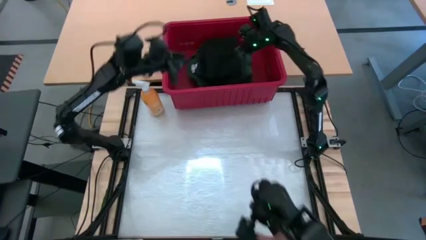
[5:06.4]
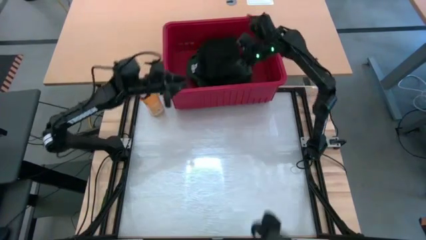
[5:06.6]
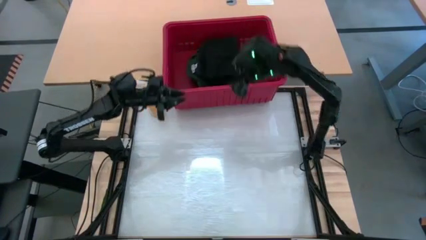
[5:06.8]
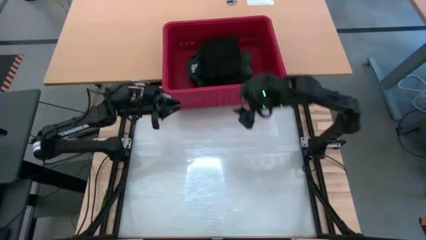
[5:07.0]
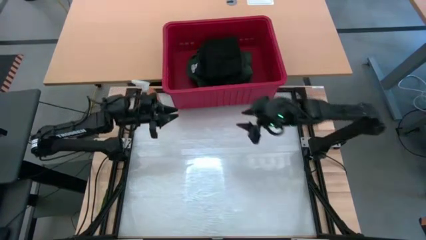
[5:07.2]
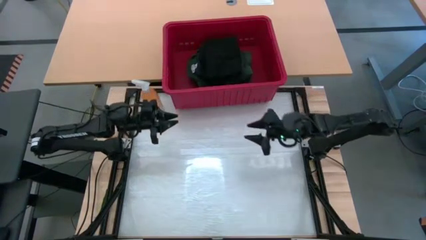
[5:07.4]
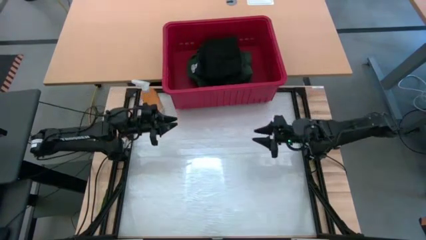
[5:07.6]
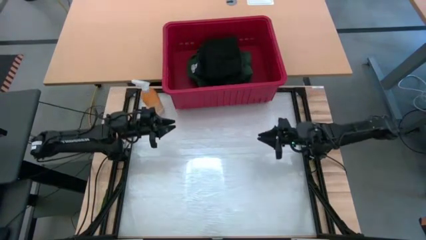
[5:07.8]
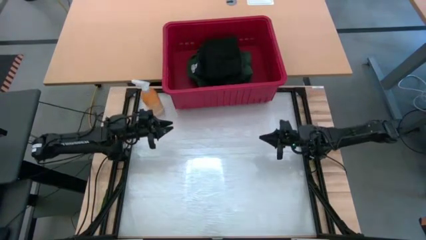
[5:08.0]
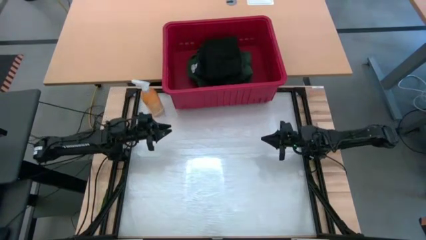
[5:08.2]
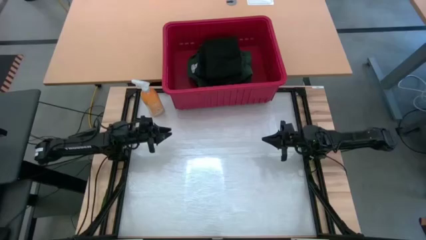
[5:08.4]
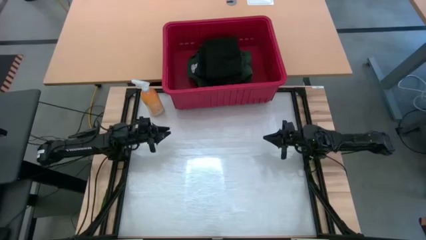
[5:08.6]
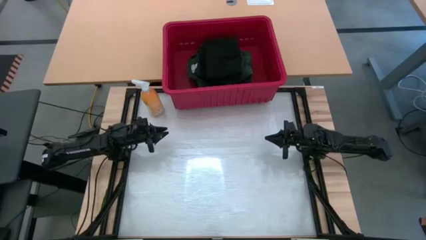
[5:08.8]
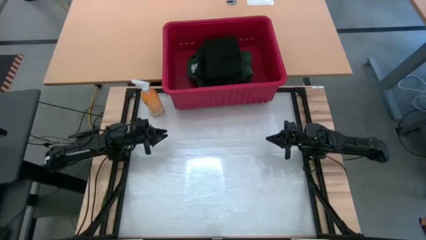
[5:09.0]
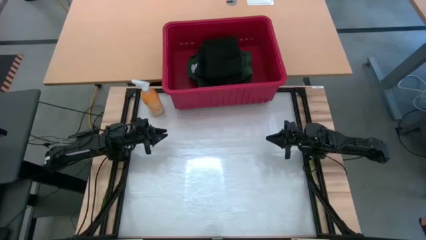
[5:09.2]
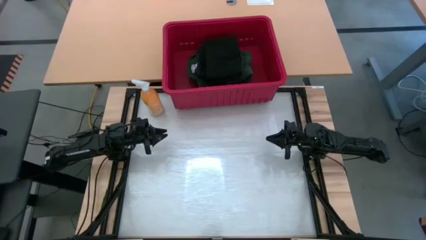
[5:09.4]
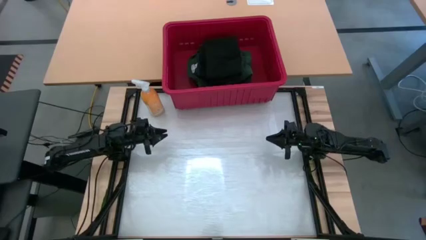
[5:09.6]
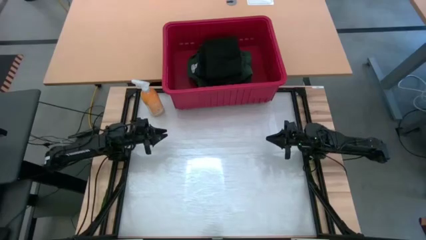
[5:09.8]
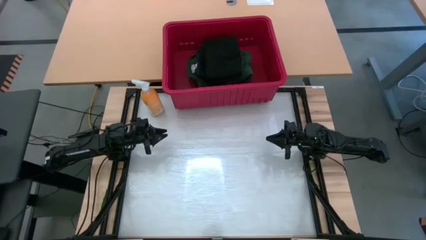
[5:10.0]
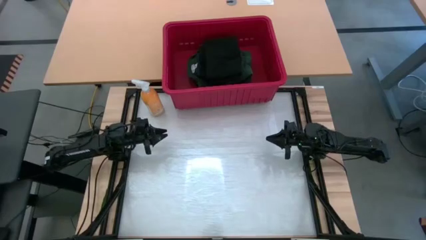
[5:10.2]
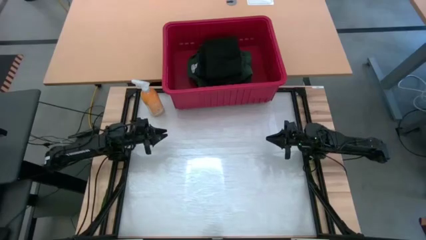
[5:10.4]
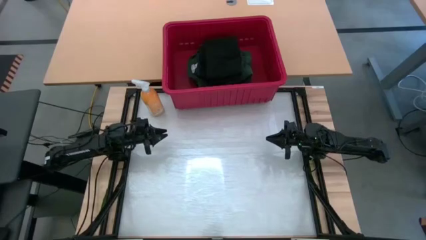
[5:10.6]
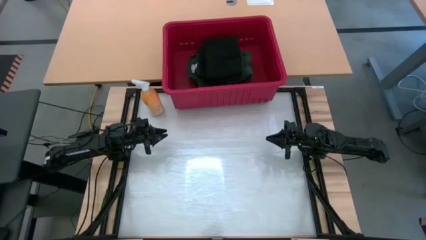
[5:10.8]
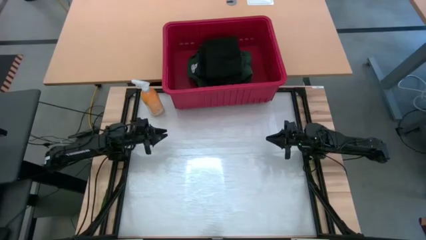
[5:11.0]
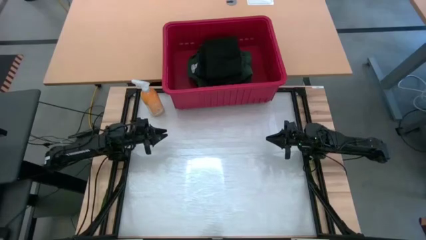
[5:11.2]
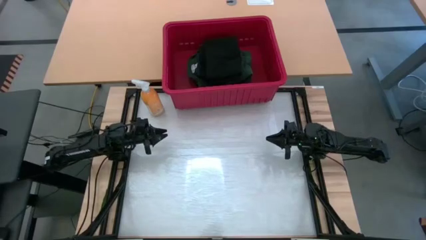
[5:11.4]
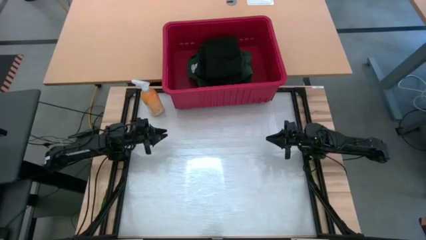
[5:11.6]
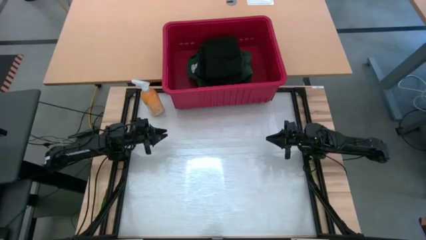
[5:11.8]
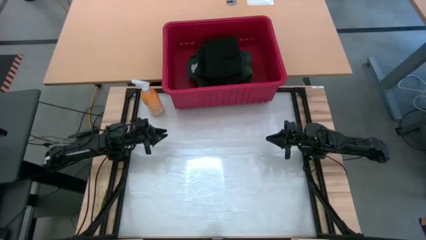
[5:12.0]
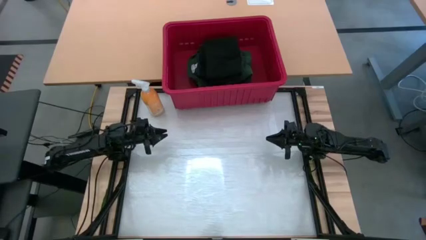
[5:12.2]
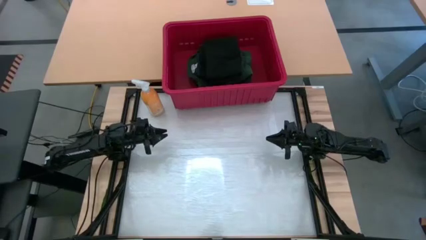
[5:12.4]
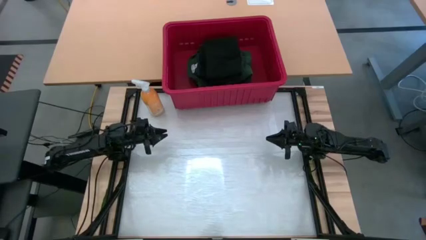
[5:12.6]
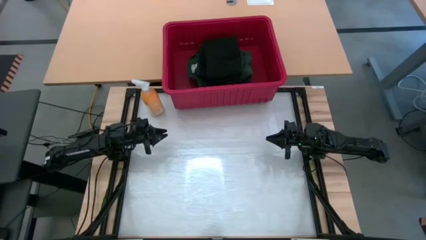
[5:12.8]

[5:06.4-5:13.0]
Task: Fold Laundry from Bin
Return to Home Position

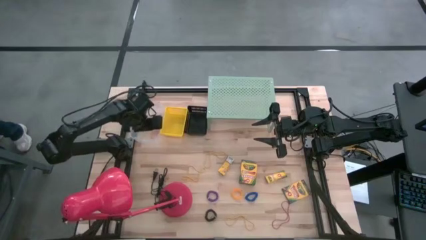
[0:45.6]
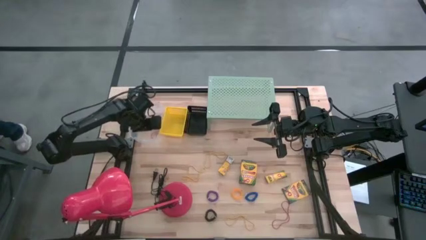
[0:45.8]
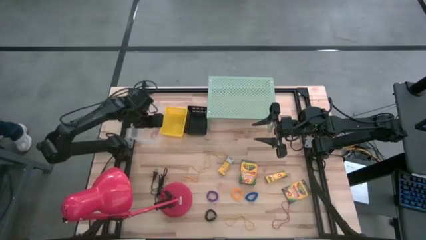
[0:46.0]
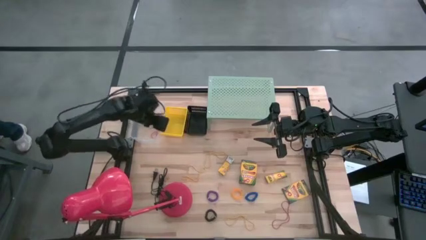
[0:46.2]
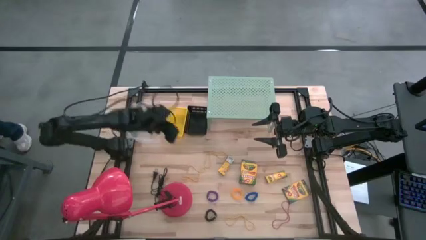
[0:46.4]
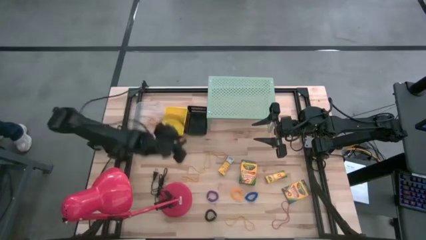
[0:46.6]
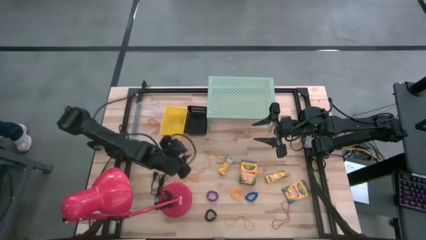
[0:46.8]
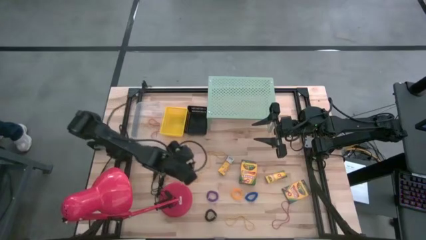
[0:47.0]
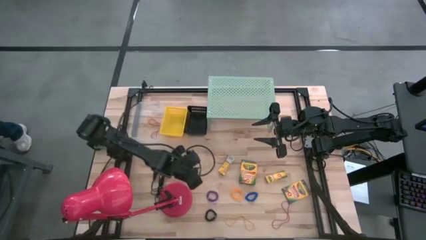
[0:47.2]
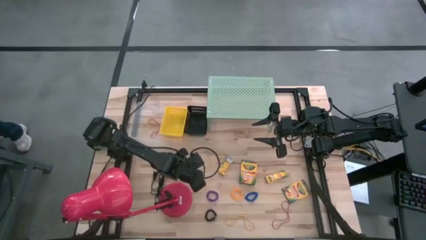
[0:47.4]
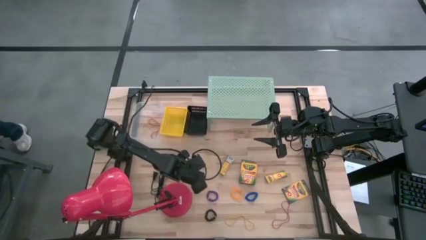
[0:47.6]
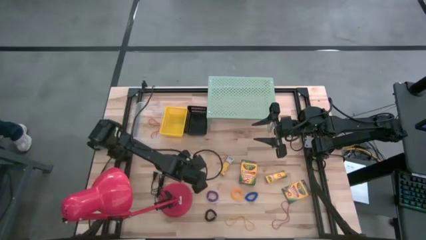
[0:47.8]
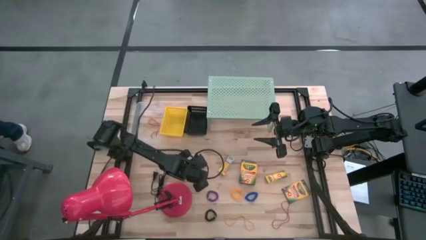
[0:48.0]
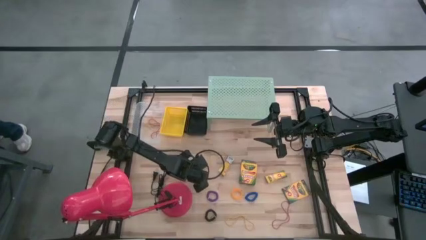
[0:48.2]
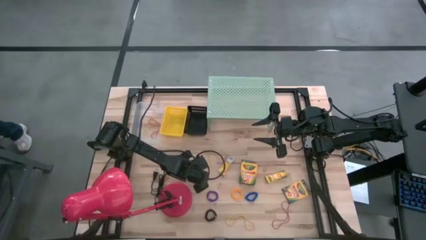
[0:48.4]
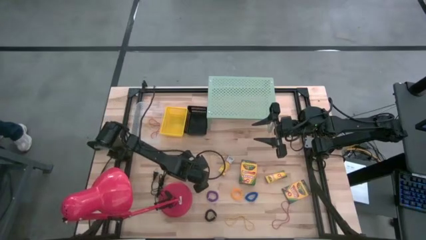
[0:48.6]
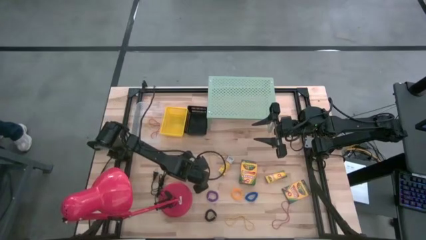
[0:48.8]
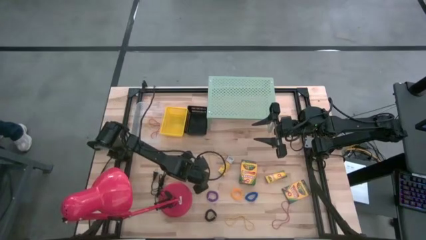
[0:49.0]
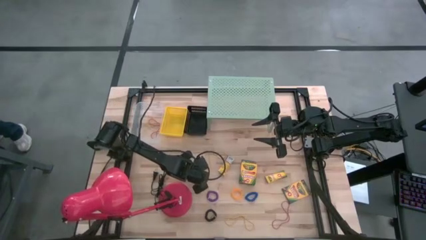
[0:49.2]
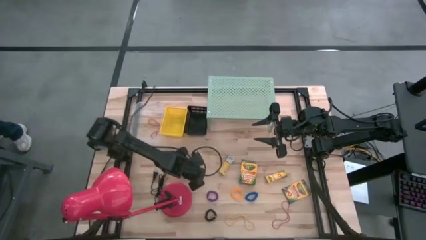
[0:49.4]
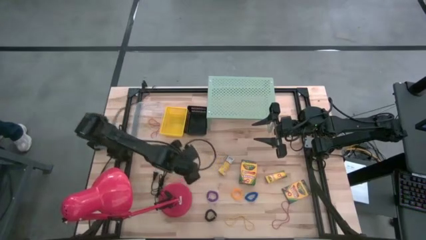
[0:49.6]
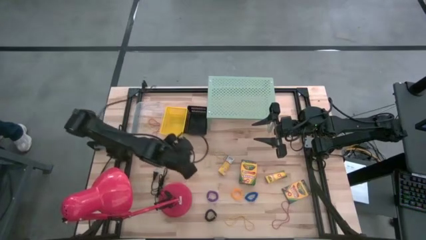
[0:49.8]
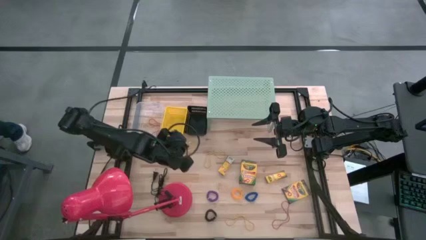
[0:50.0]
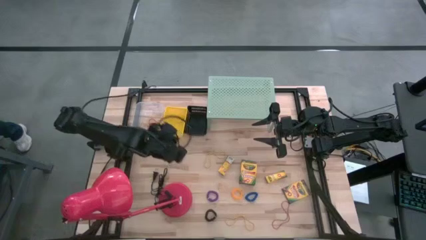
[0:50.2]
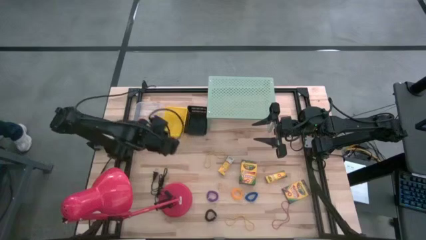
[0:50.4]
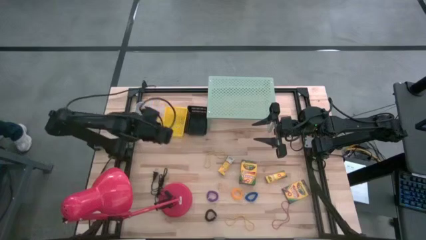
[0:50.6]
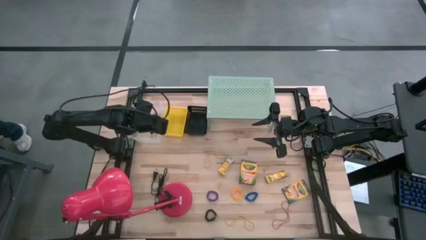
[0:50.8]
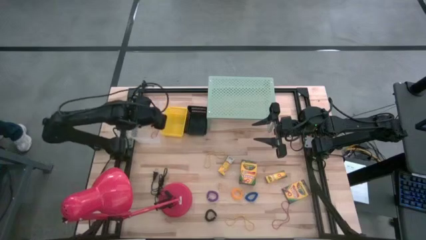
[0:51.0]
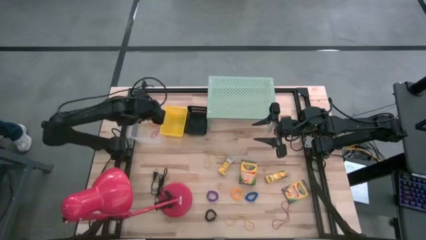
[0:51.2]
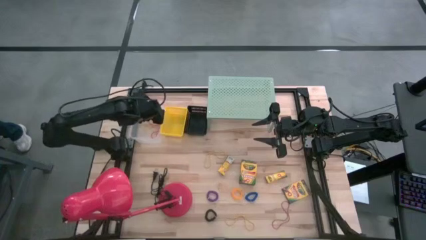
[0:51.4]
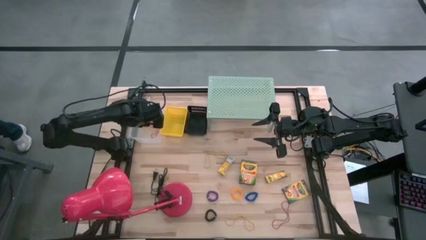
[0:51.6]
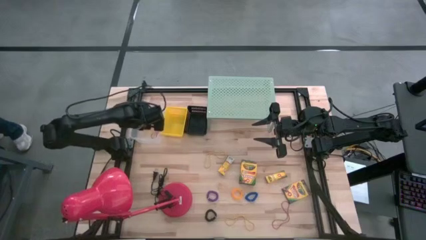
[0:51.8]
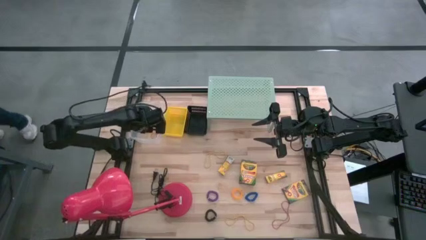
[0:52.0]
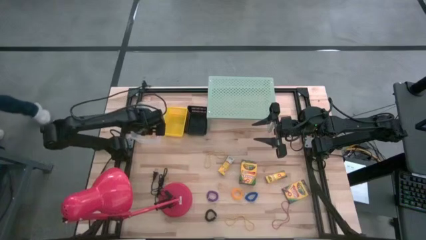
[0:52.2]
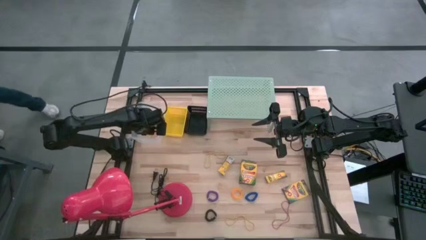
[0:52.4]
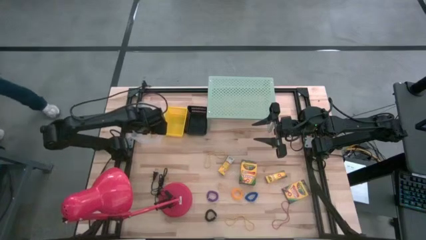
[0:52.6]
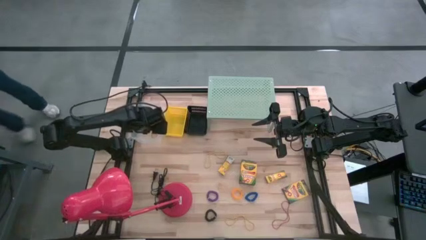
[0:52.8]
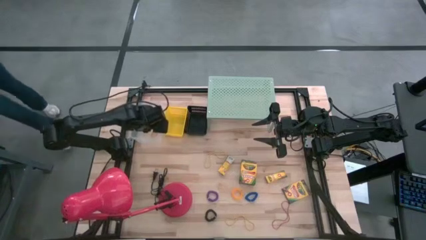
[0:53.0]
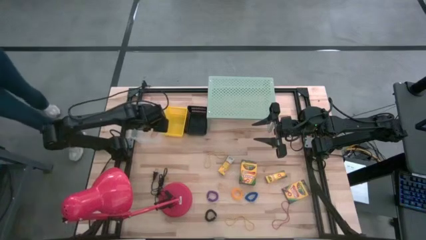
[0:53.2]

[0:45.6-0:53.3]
Task: Pick & Place Office Desk Supplies
Put the yellow rubber band into the transparent bin
